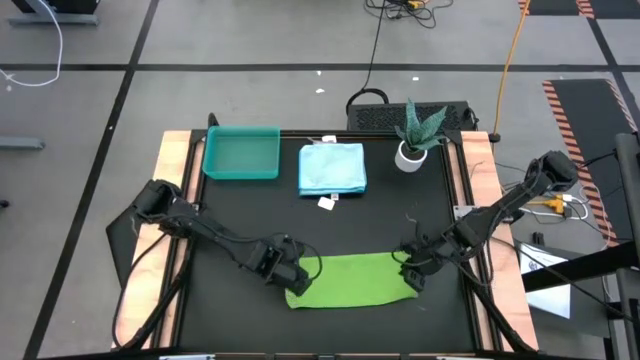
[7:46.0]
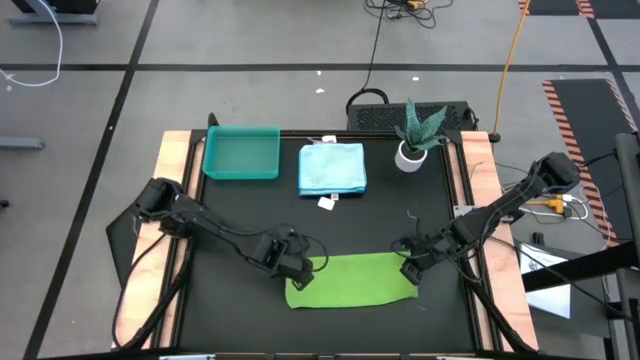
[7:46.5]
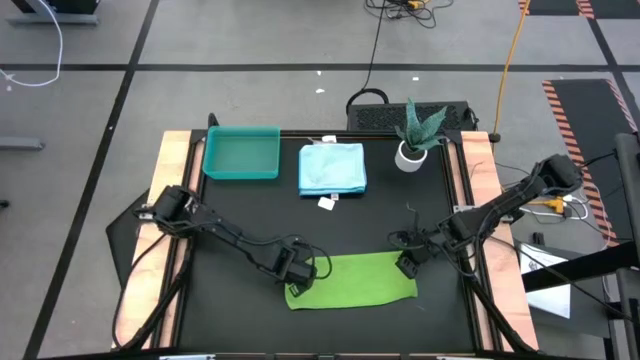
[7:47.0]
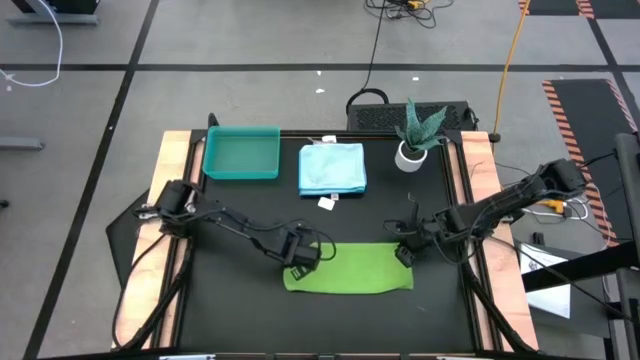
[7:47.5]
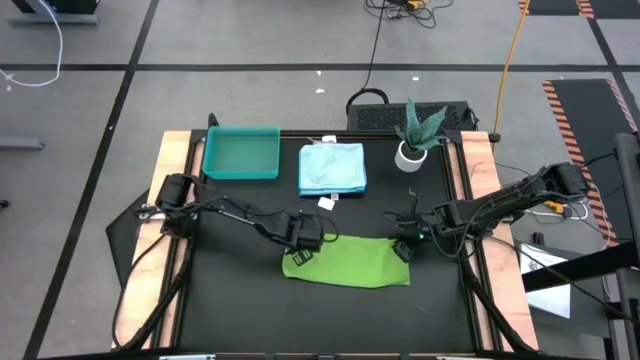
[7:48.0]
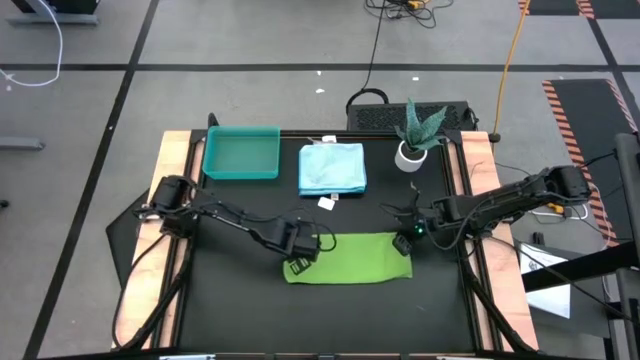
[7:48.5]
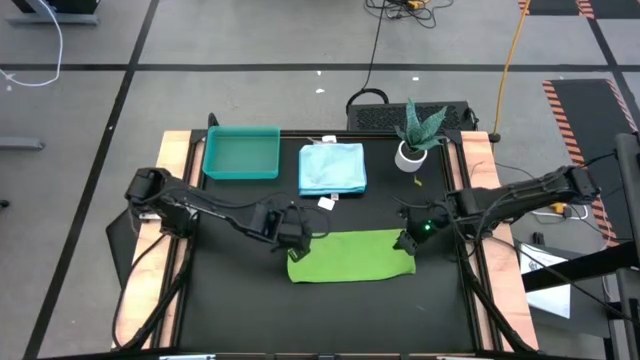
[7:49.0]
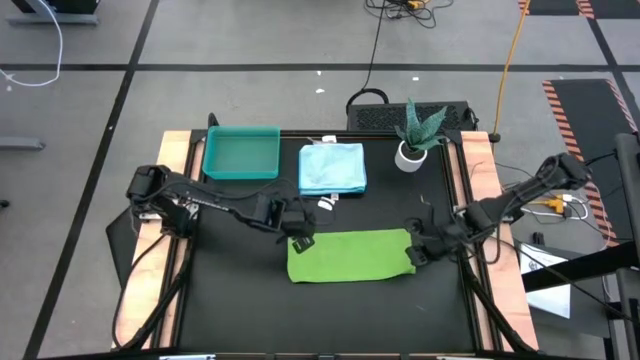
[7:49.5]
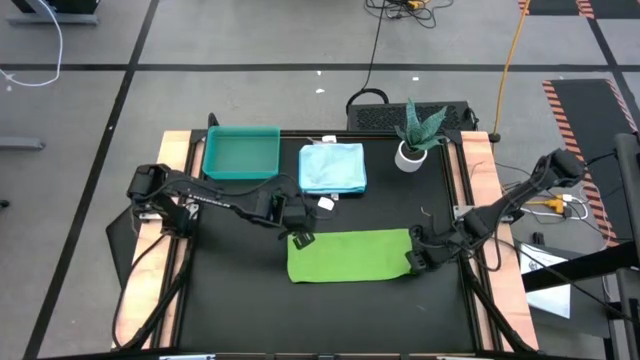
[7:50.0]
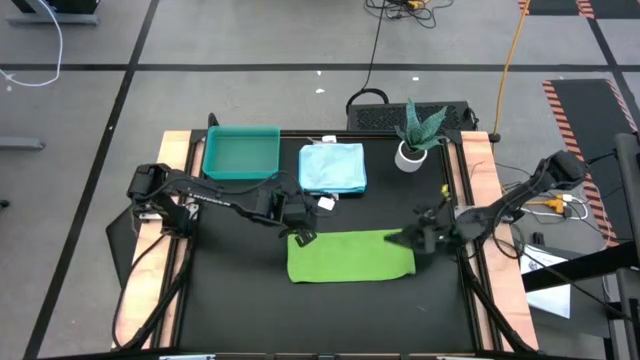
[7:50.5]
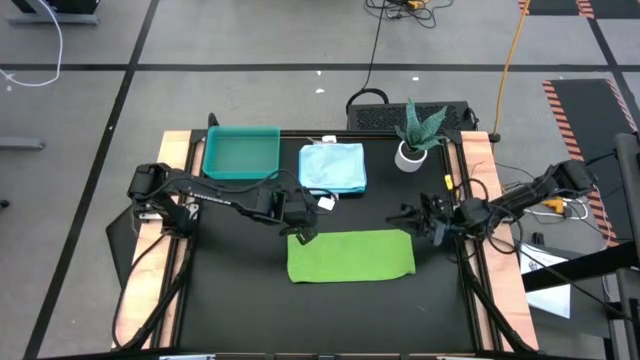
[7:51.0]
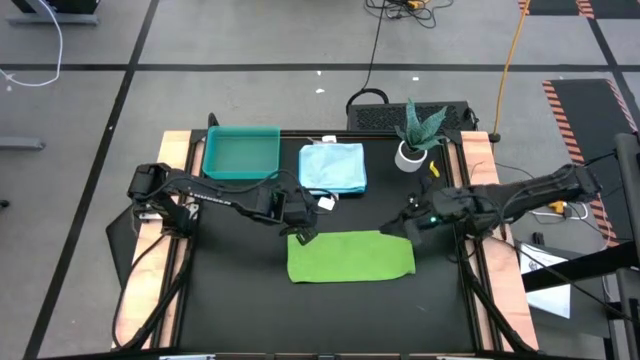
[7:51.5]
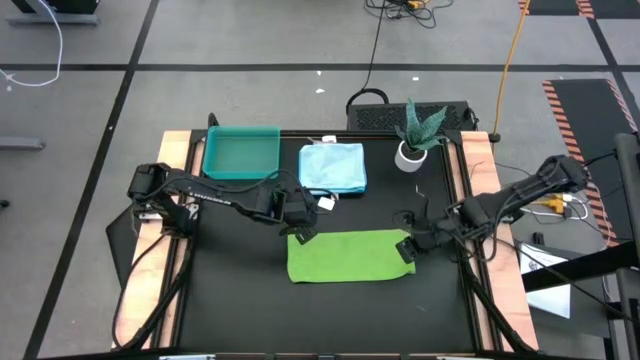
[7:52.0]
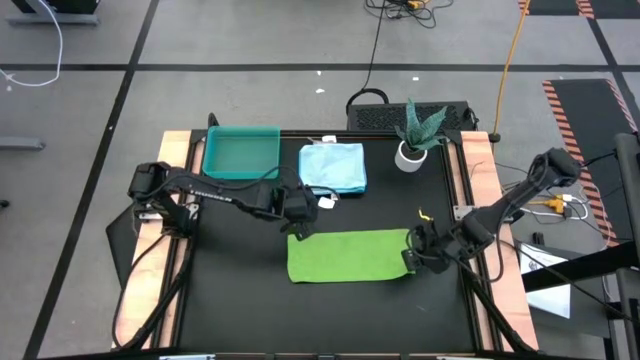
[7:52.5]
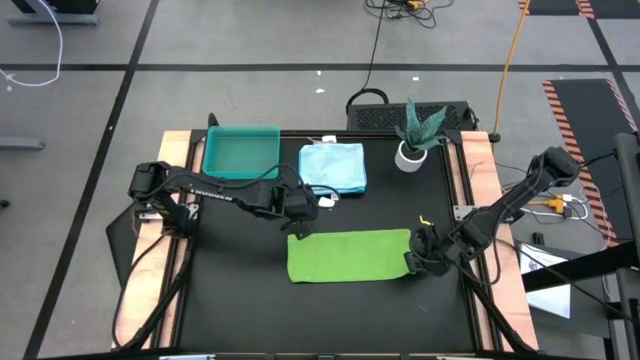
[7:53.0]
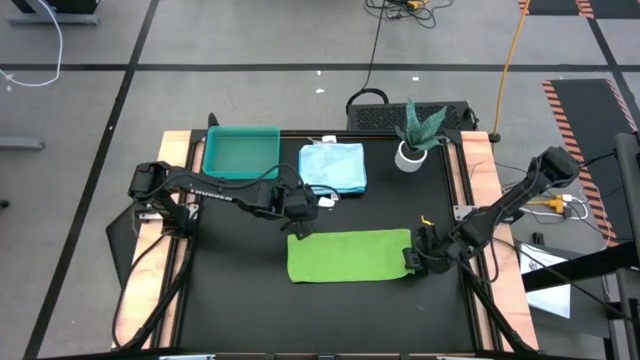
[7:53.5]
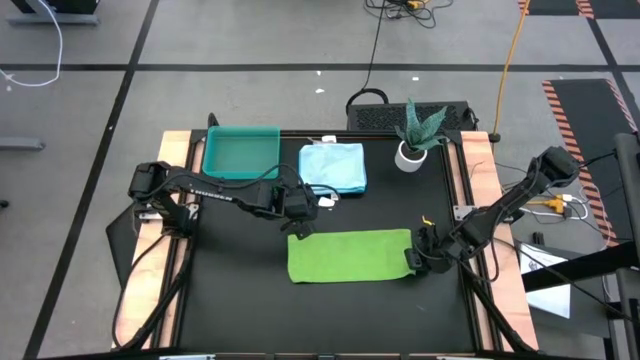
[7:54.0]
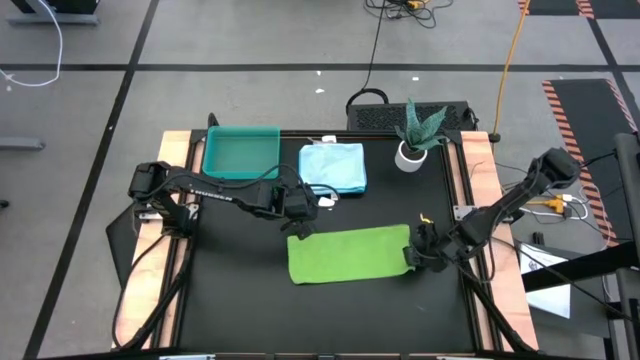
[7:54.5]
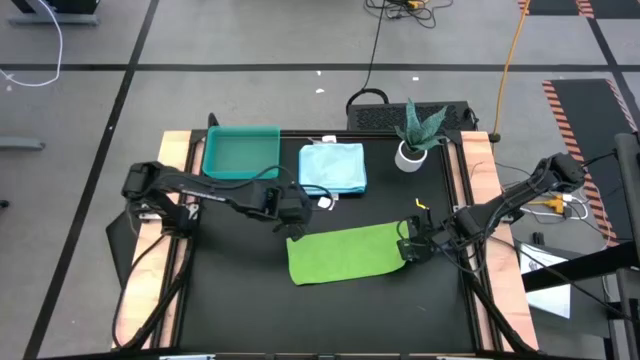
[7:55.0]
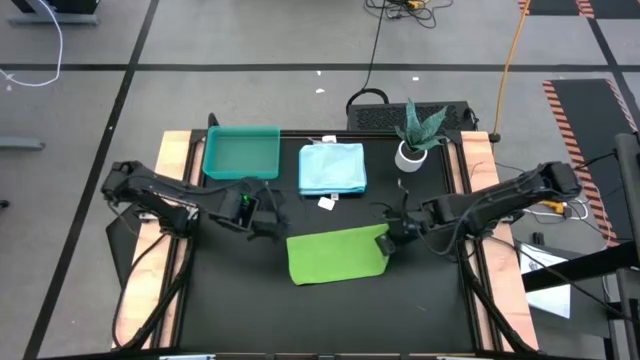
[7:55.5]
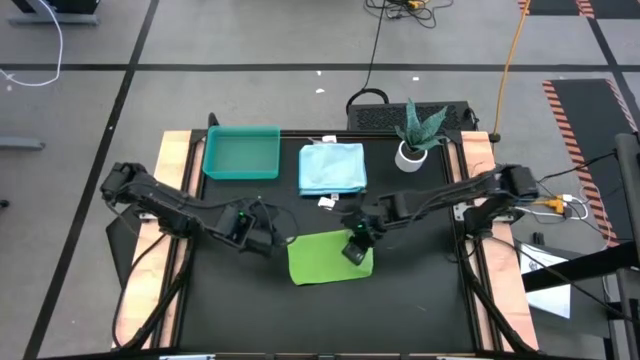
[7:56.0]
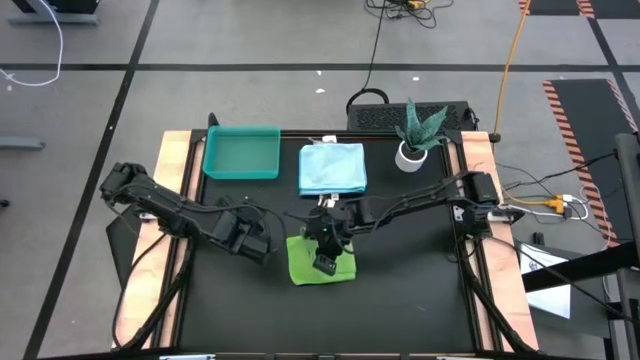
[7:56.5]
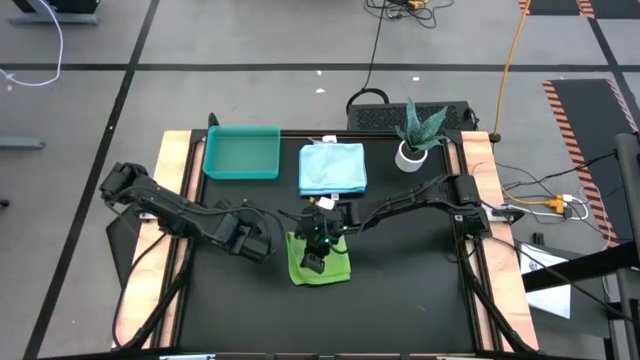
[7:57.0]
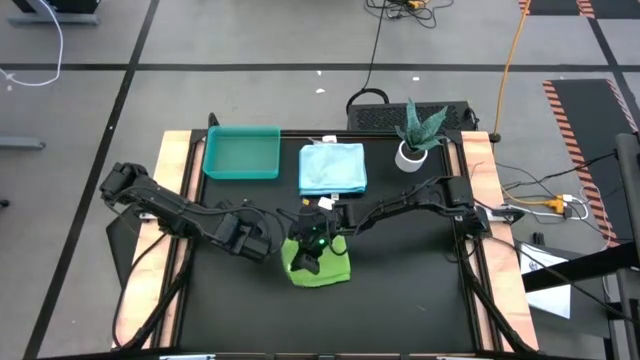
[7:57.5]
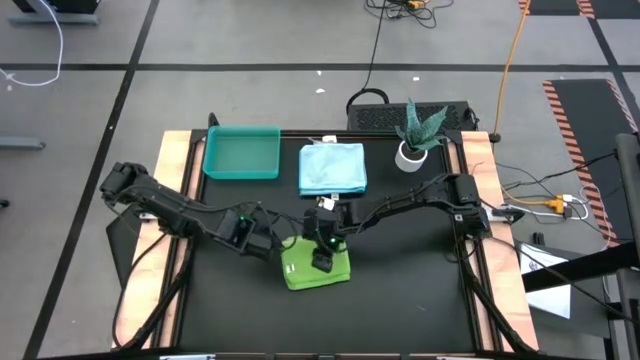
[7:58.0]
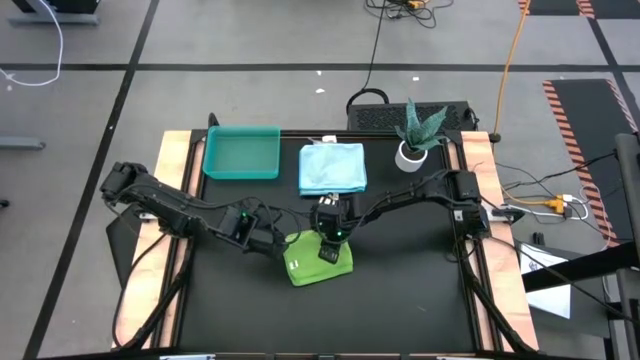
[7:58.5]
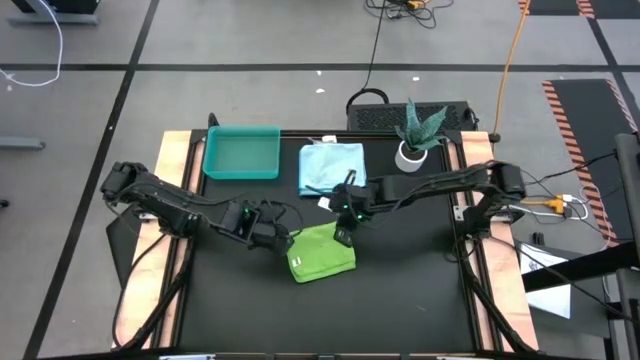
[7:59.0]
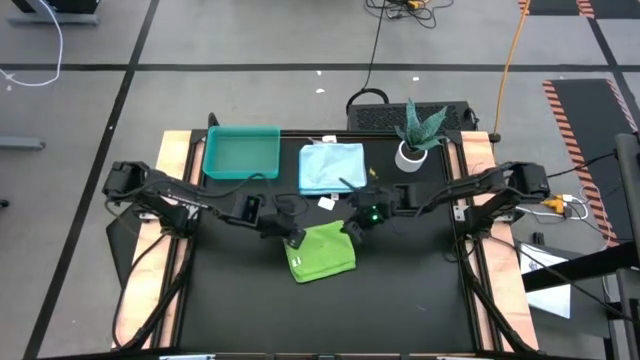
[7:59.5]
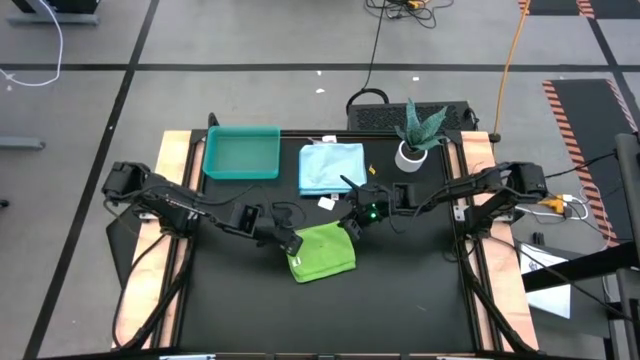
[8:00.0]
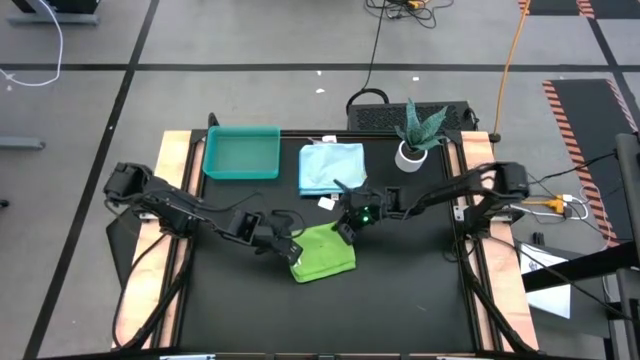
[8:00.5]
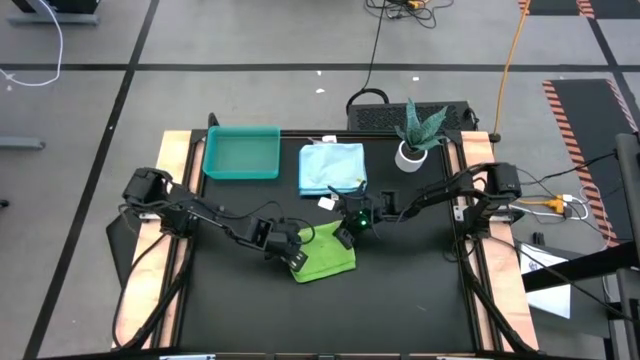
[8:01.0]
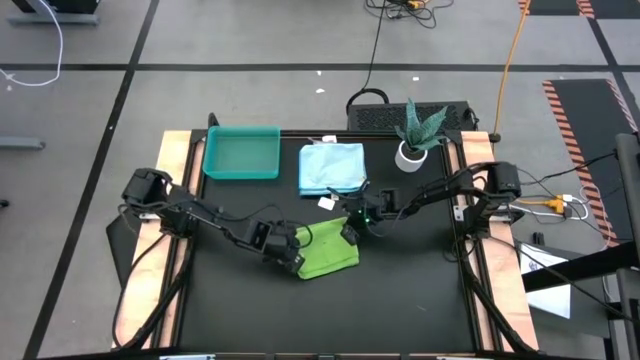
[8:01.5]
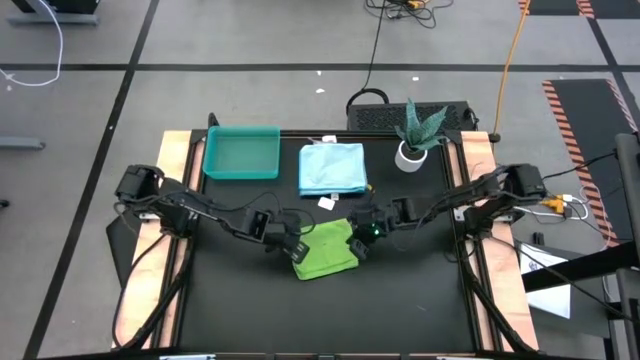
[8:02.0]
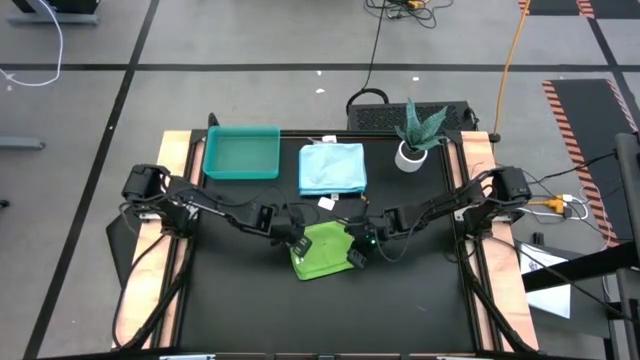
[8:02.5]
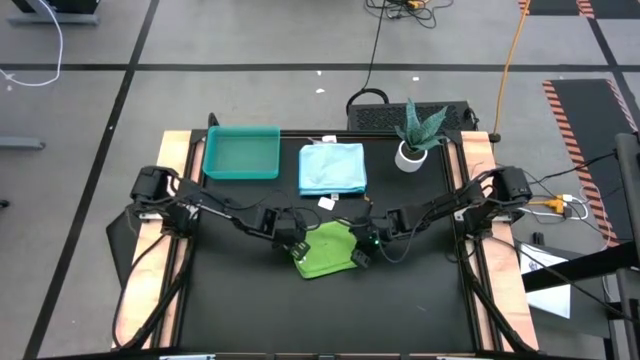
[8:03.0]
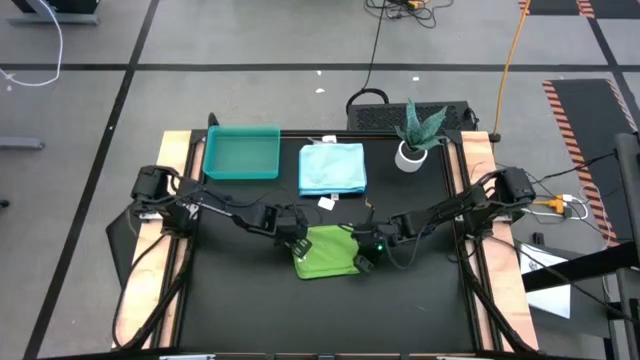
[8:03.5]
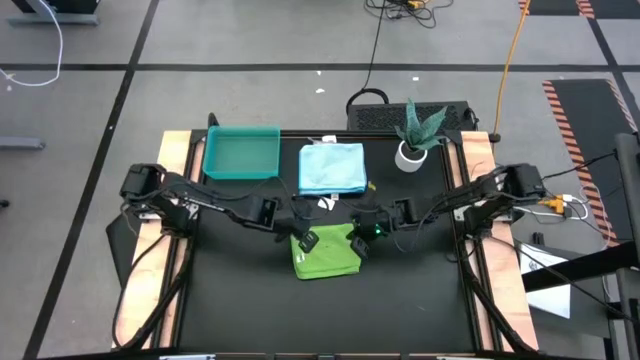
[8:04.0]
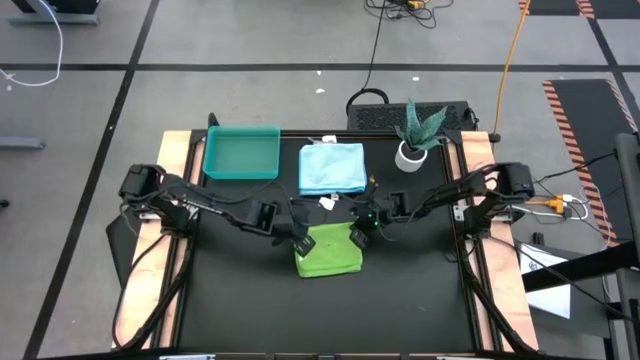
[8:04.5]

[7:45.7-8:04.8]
Task: Fold microfiber towels
Fold the green microfiber towel

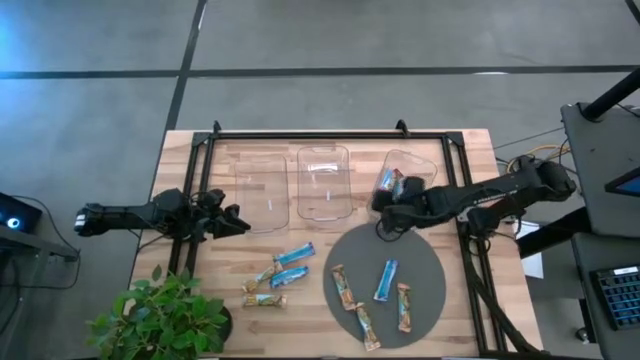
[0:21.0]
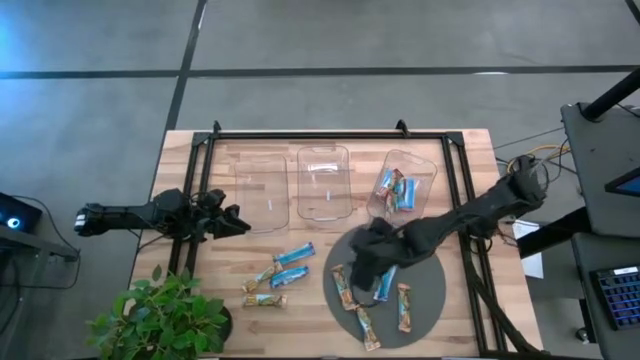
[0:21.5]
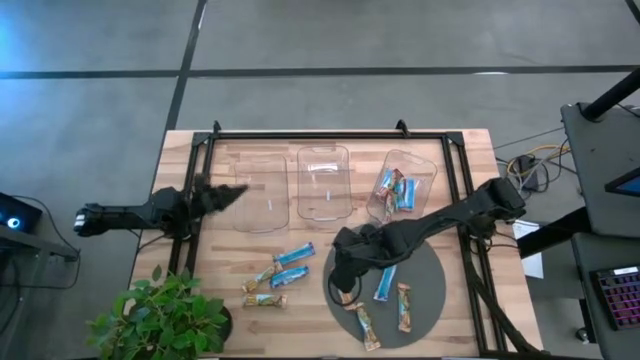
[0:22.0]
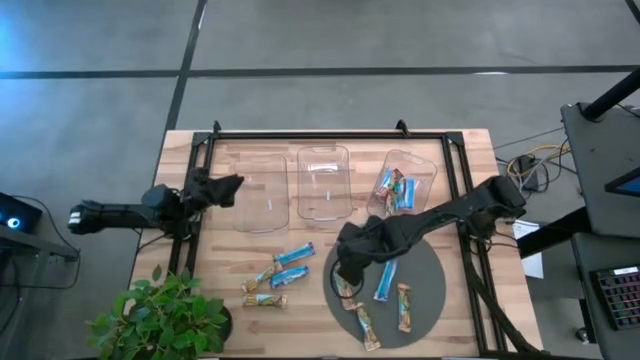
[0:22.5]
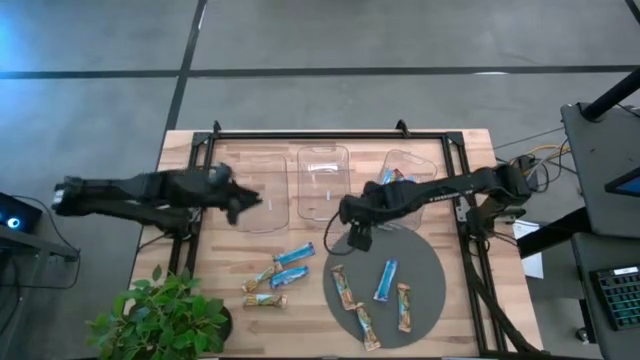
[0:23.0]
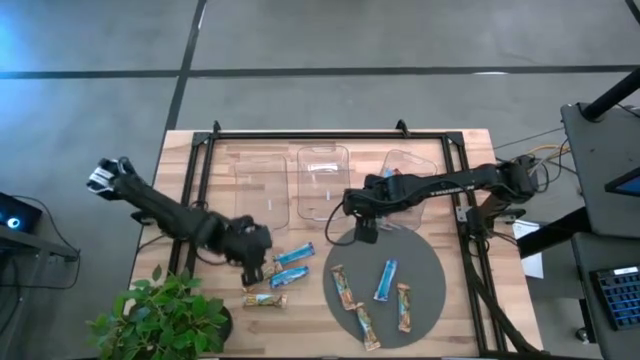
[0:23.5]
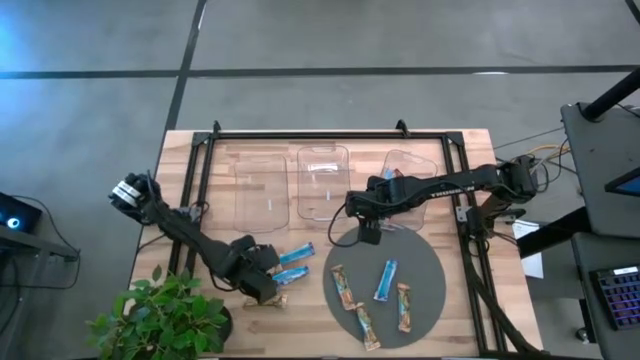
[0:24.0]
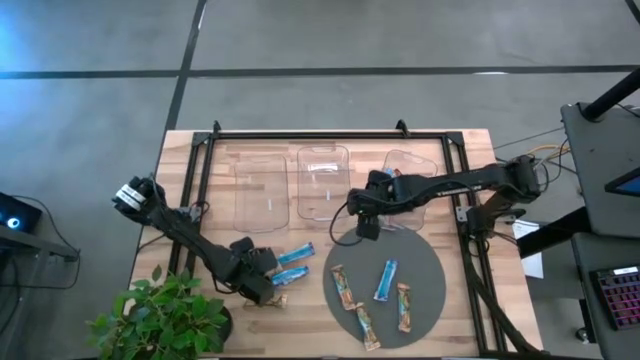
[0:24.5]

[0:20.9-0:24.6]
Task: Pick and place Granola Bars by type
Adjust the right transparent bin

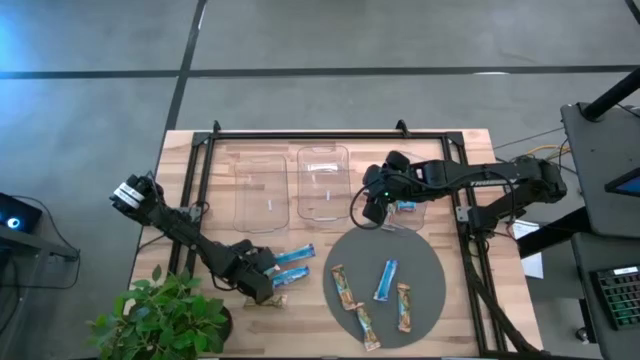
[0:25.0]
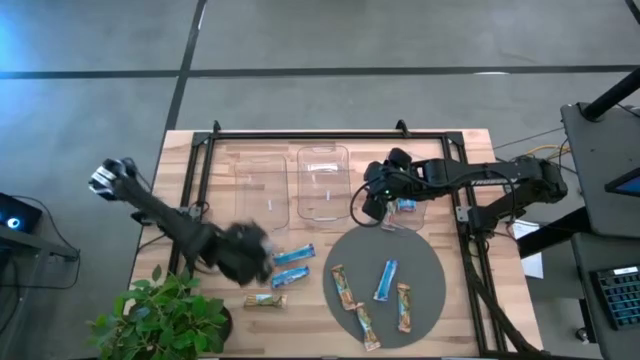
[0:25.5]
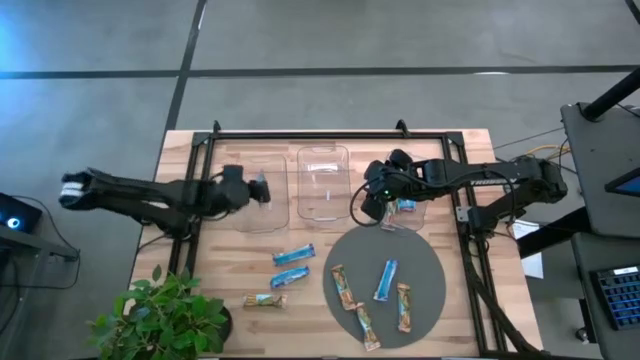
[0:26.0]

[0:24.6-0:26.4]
Put the yellow granola bar into the left transparent bin
